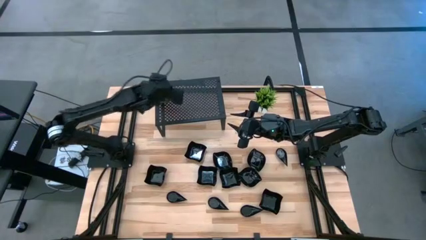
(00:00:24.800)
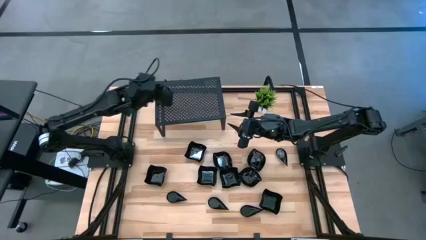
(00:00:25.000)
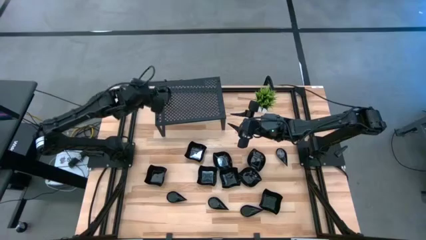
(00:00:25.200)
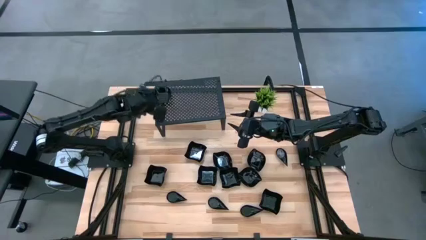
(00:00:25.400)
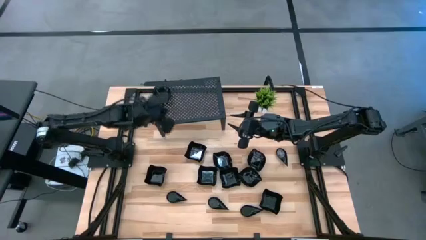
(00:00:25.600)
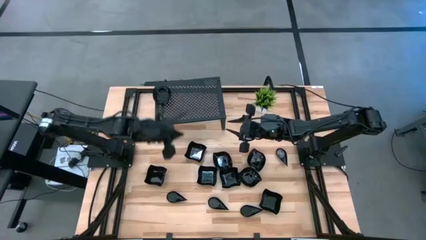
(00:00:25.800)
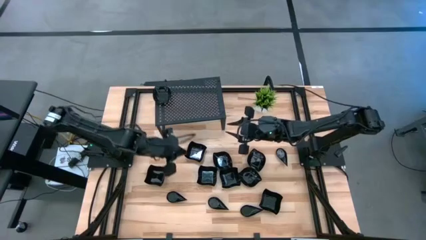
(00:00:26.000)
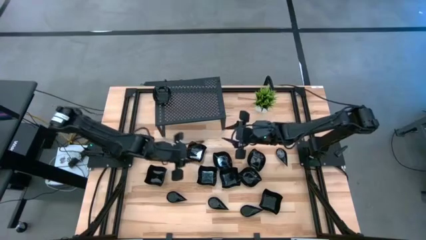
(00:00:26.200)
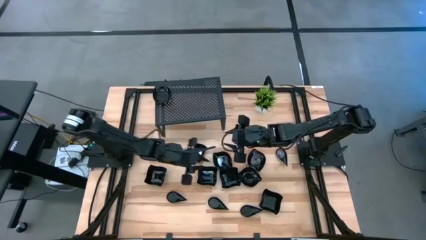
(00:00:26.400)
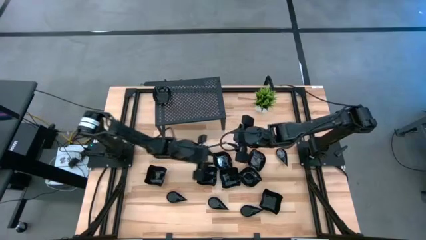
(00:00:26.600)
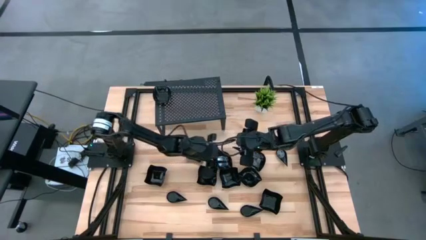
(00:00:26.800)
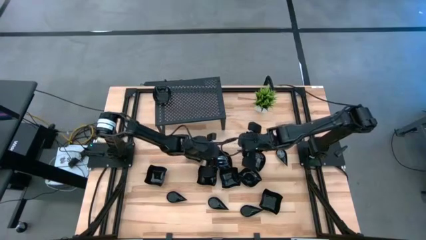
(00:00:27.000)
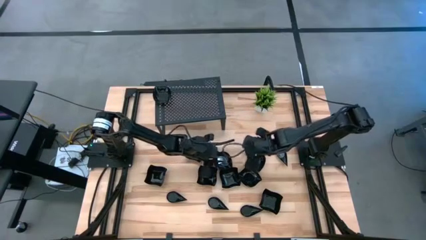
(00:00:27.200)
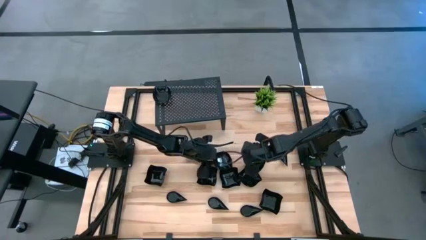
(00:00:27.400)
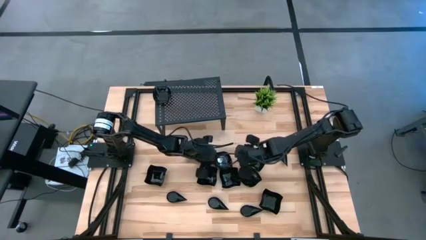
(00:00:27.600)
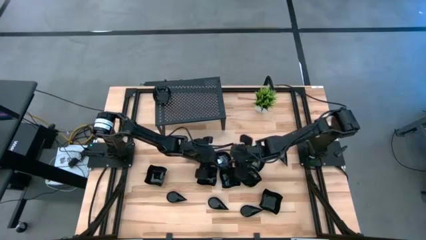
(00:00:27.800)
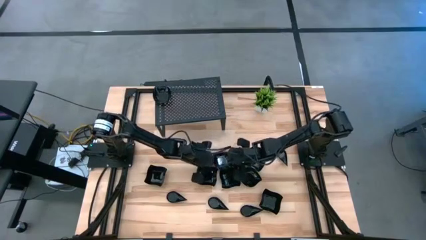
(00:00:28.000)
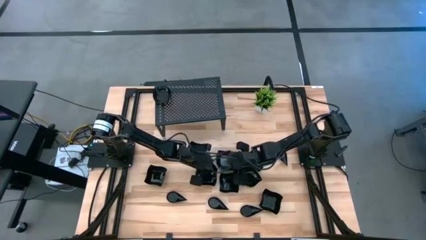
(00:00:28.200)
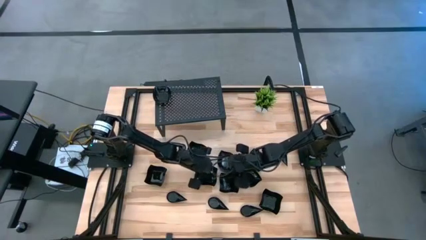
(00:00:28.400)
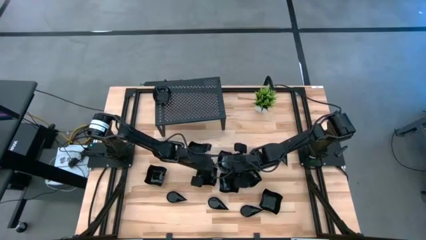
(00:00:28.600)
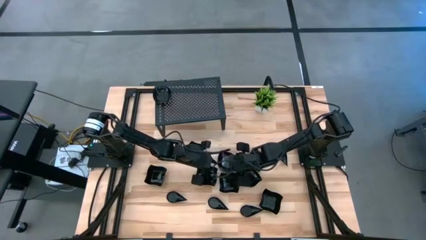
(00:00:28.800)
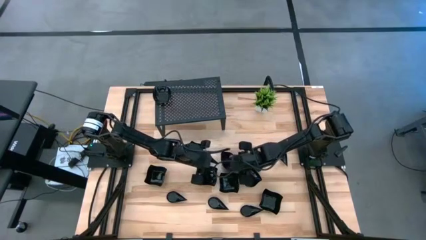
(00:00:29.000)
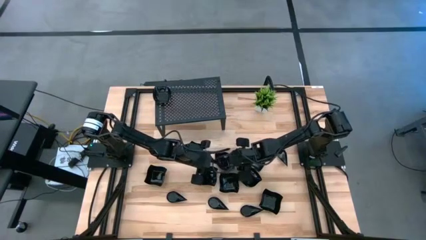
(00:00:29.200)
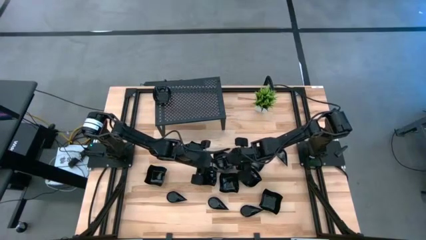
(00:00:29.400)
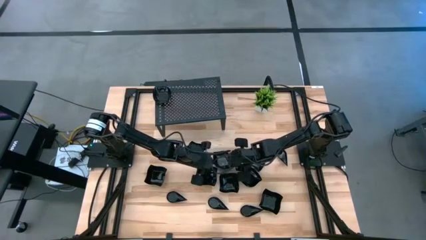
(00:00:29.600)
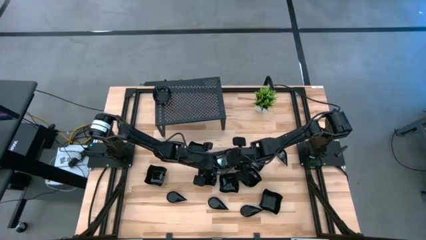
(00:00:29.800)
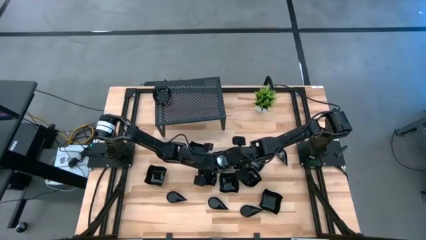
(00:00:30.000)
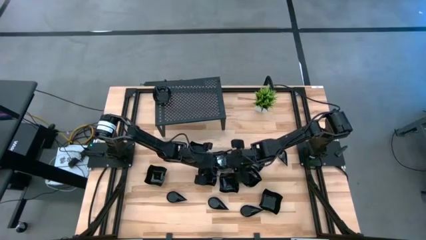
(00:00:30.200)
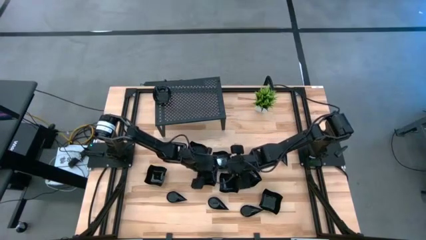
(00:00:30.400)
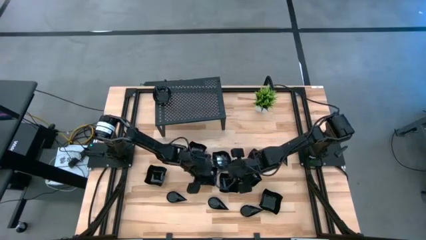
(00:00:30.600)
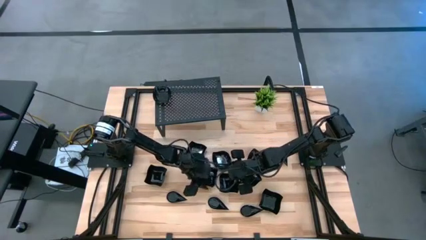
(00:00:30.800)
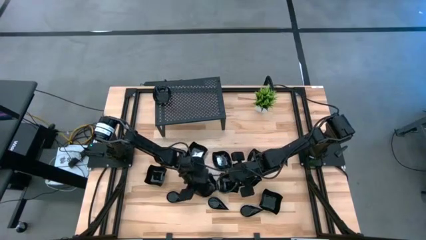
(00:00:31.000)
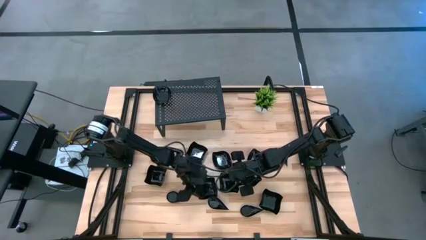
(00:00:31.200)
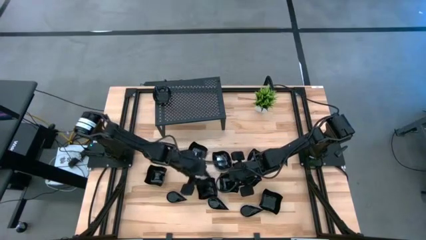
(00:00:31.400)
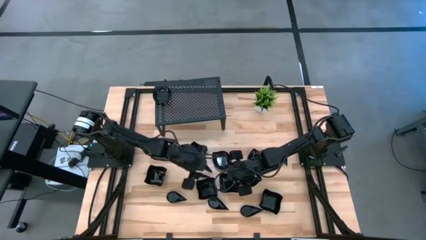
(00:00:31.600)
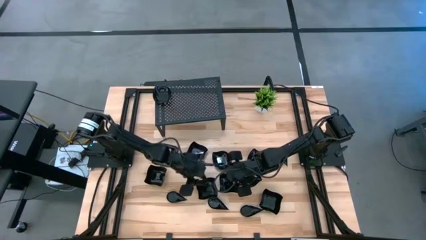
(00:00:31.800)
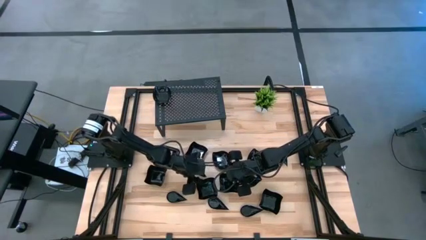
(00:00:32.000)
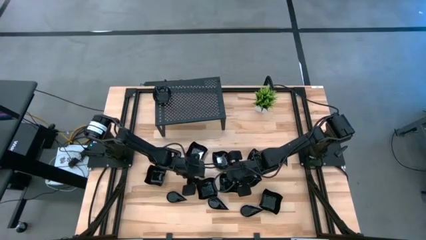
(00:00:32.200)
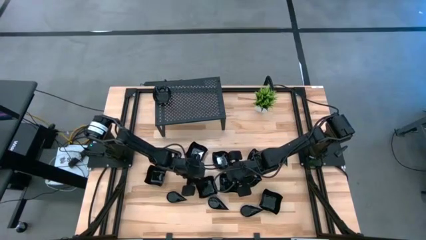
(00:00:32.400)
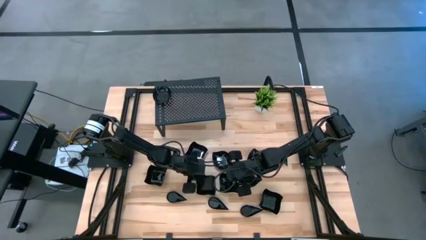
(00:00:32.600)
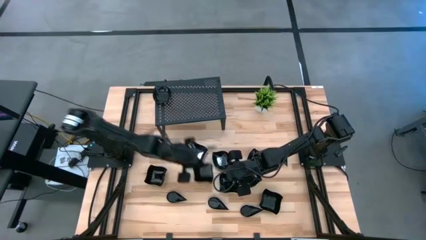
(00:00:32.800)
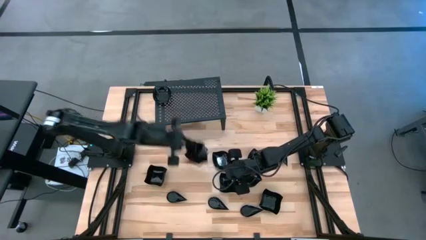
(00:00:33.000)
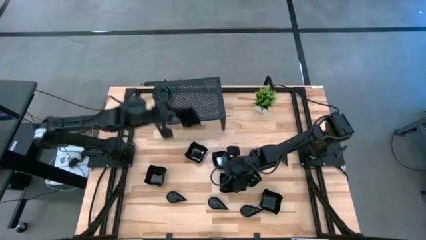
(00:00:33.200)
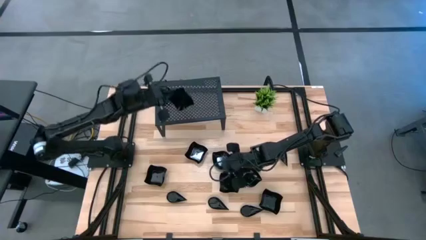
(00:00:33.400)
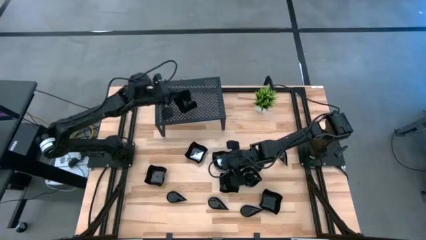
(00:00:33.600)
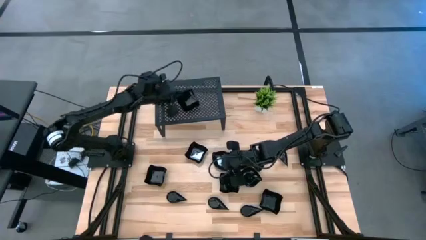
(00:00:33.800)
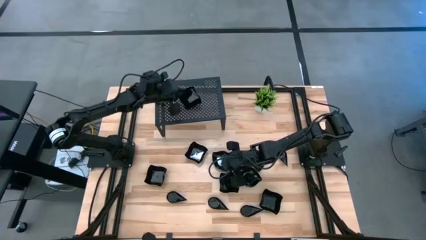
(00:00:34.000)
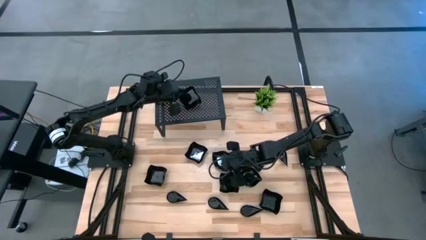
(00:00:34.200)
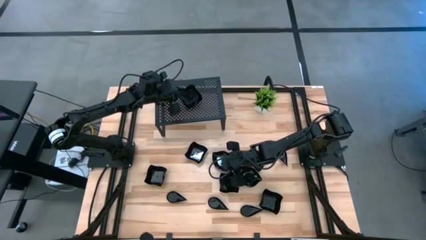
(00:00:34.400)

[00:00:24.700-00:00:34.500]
Task: Pick & Place Mini shaped plates
Put the black distorted square plate on the shelf

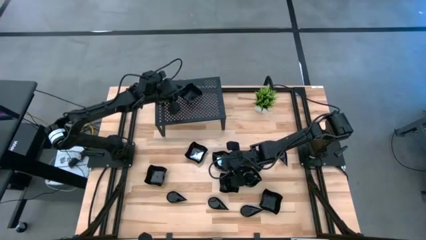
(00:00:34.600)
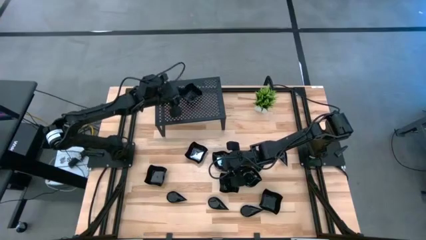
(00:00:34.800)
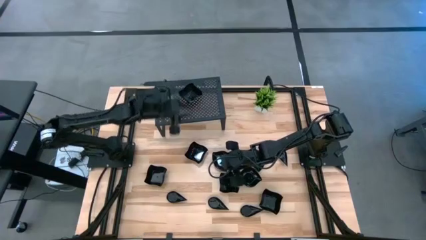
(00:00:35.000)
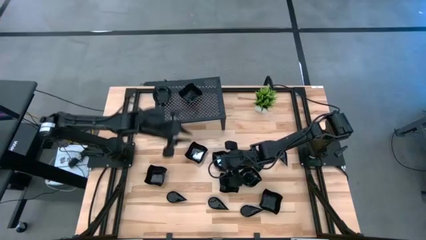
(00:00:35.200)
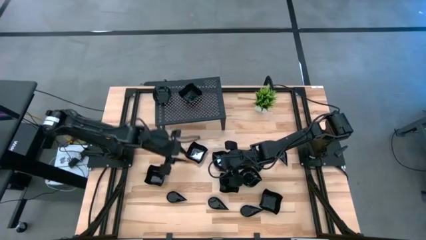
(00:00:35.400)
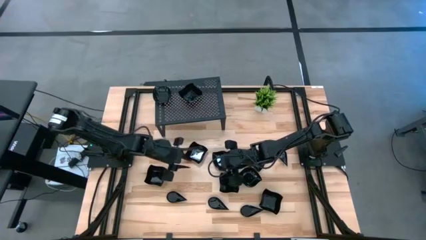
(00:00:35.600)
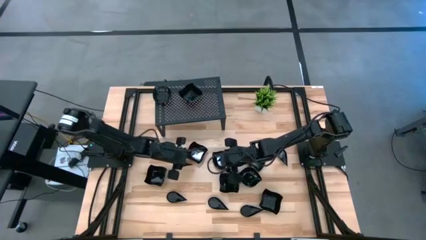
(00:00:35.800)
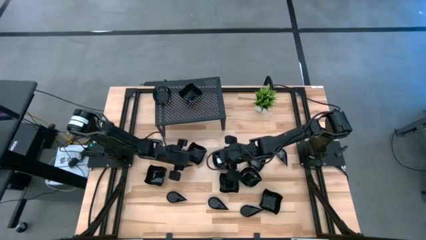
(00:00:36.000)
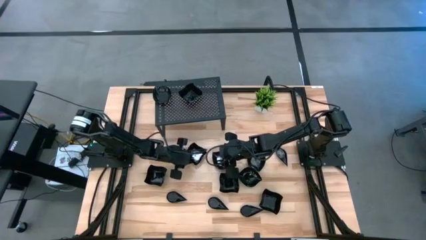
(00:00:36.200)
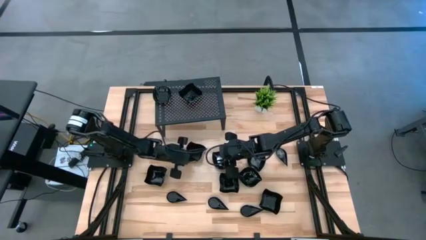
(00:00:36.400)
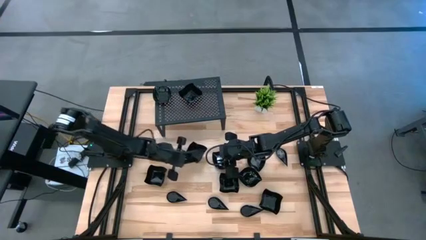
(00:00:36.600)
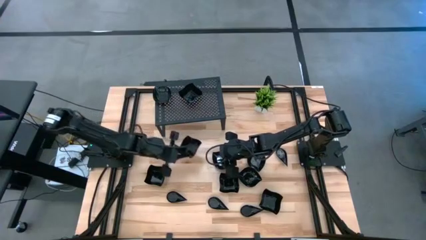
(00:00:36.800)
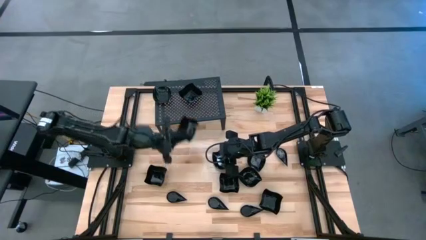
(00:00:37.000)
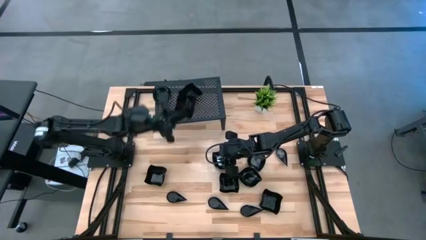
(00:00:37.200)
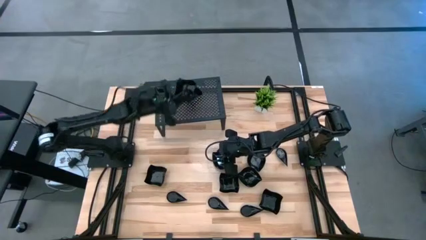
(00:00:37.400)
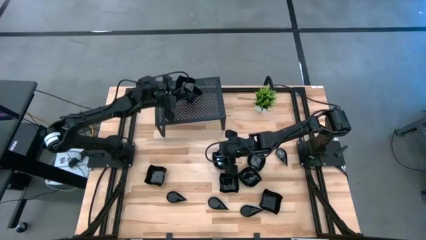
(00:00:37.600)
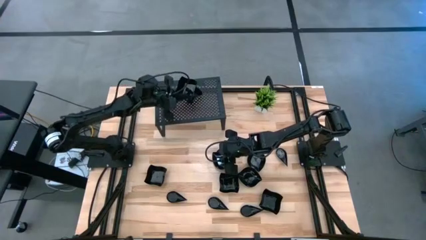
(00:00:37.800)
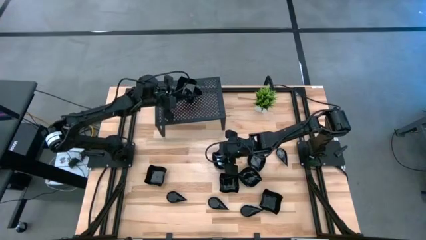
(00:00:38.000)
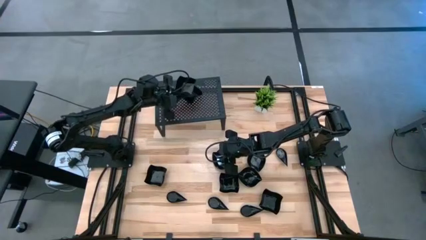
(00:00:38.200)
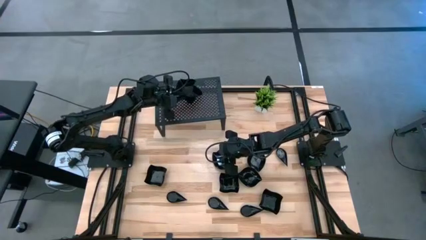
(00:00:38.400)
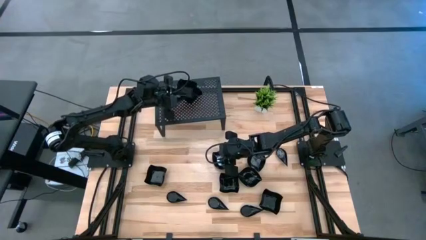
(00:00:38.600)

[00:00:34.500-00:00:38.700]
Stack the black distorted square plate on top of the black distorted square plate on the shelf
